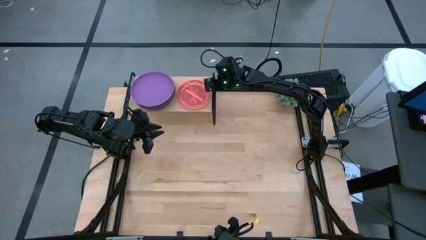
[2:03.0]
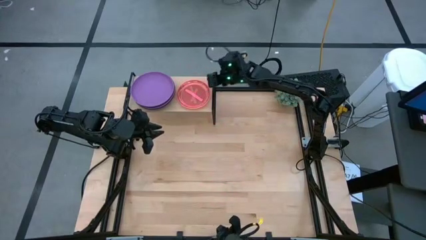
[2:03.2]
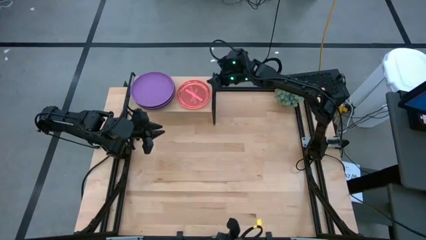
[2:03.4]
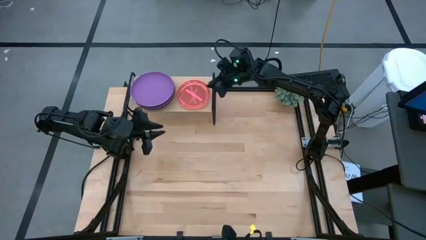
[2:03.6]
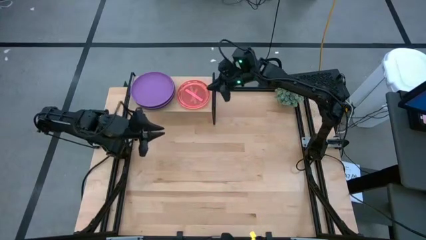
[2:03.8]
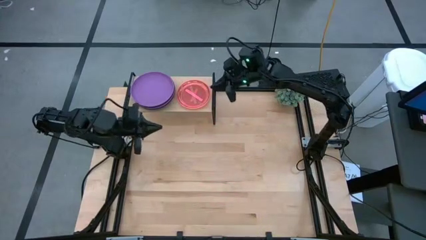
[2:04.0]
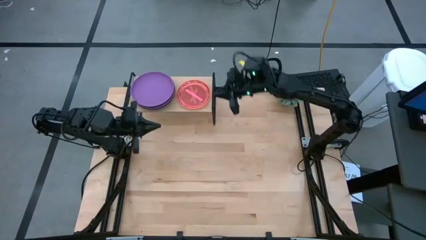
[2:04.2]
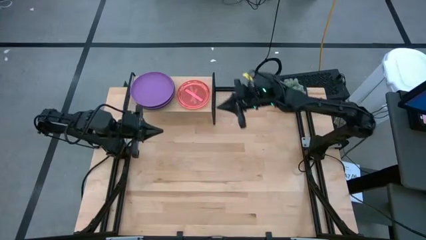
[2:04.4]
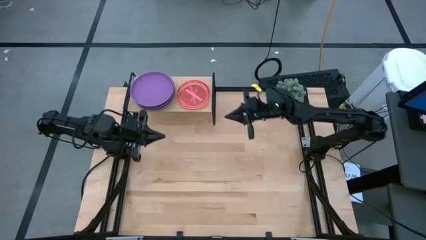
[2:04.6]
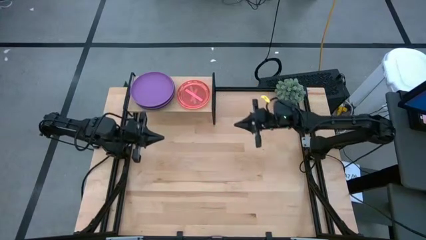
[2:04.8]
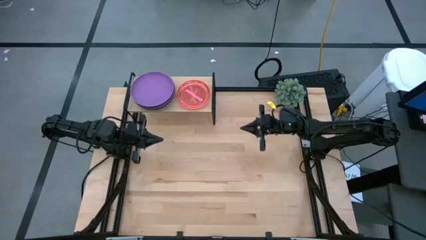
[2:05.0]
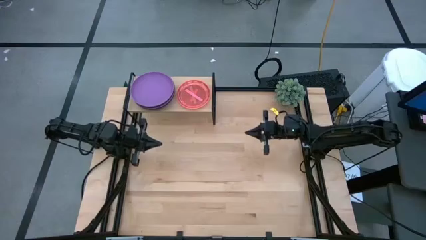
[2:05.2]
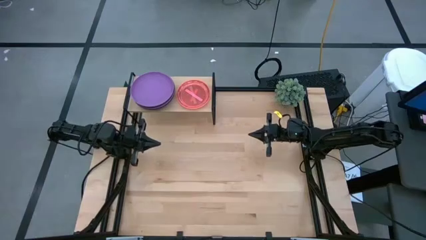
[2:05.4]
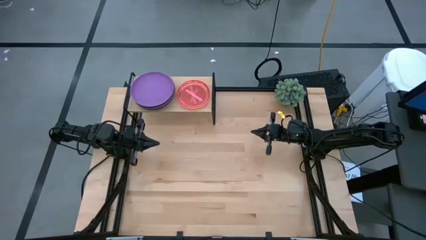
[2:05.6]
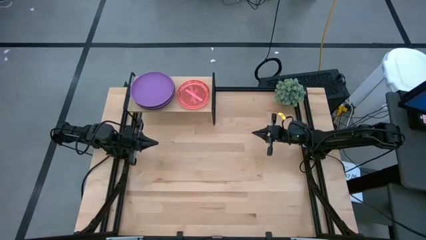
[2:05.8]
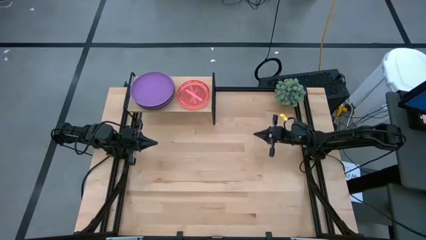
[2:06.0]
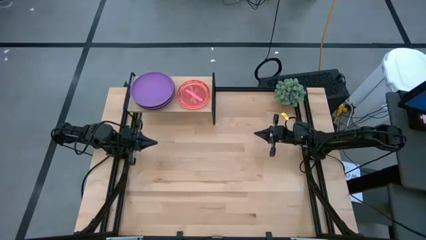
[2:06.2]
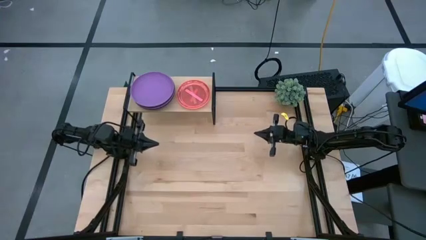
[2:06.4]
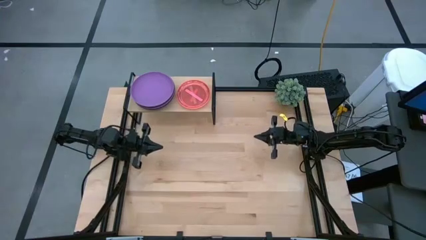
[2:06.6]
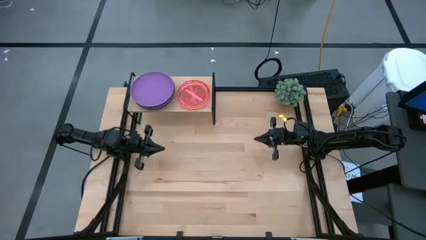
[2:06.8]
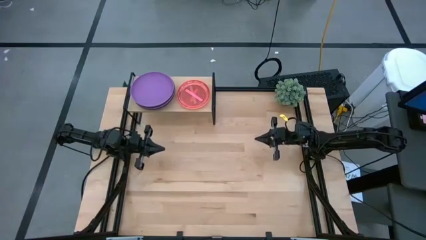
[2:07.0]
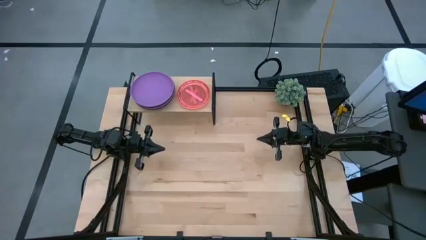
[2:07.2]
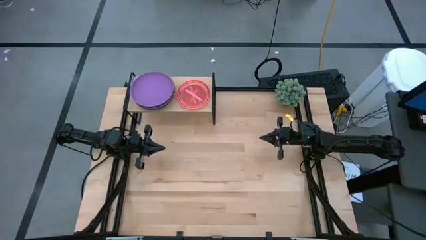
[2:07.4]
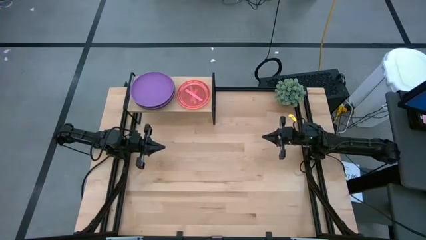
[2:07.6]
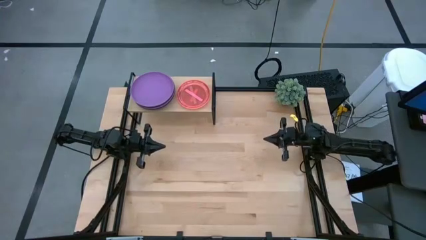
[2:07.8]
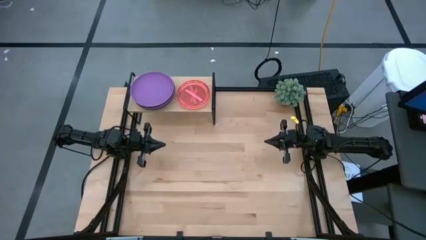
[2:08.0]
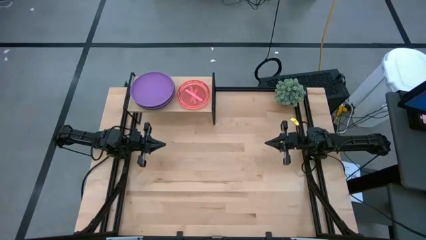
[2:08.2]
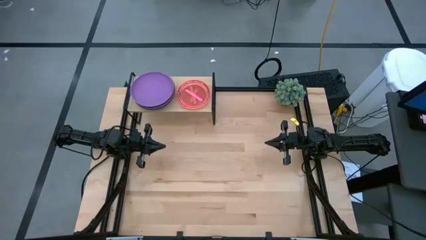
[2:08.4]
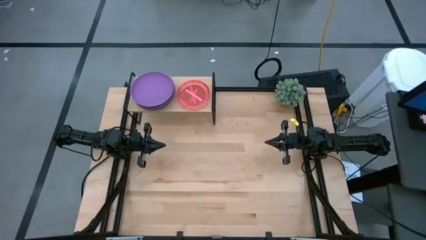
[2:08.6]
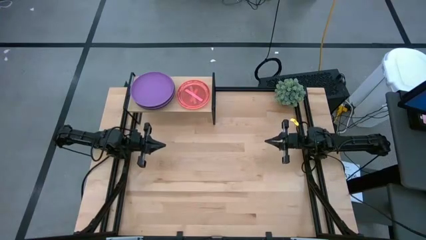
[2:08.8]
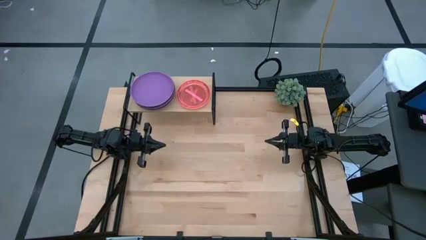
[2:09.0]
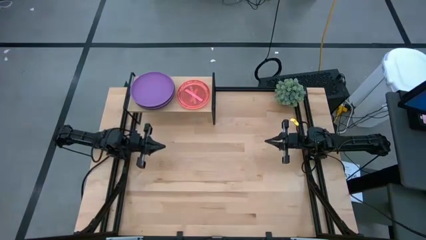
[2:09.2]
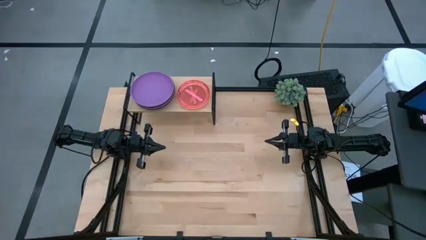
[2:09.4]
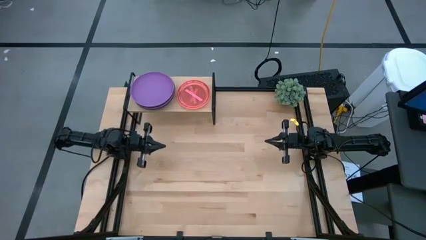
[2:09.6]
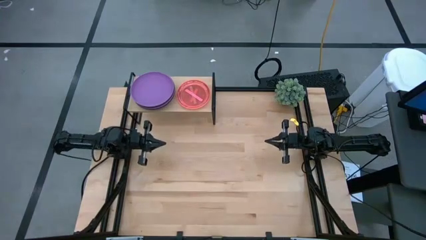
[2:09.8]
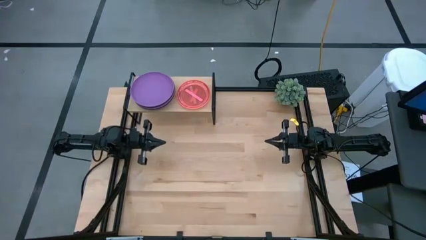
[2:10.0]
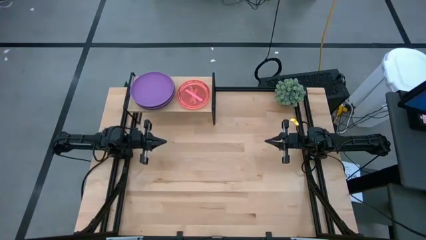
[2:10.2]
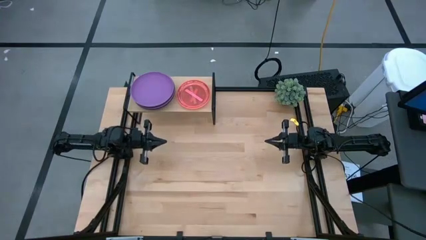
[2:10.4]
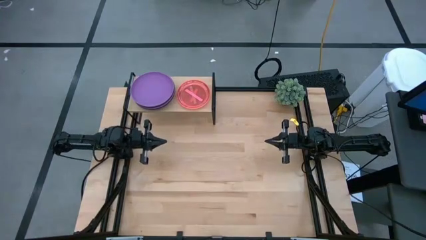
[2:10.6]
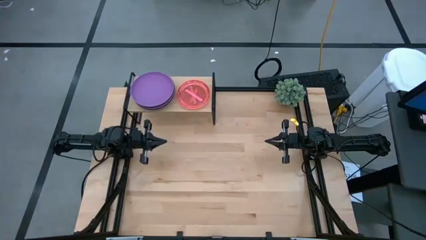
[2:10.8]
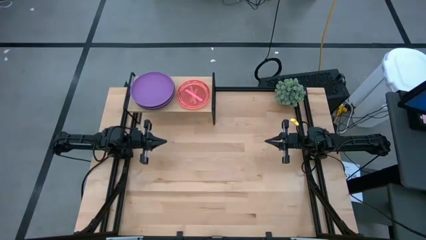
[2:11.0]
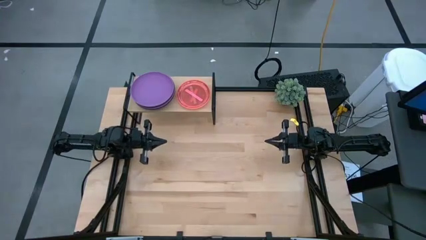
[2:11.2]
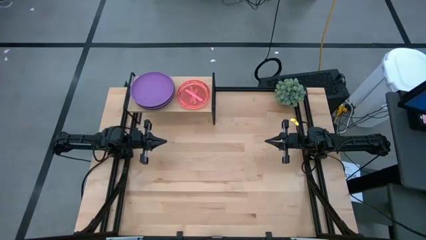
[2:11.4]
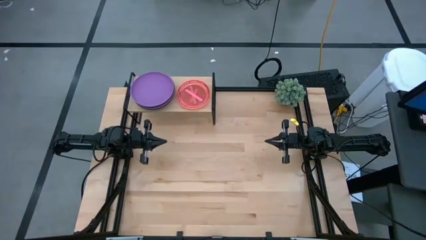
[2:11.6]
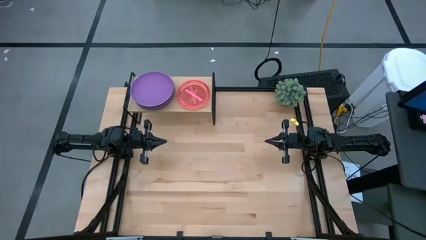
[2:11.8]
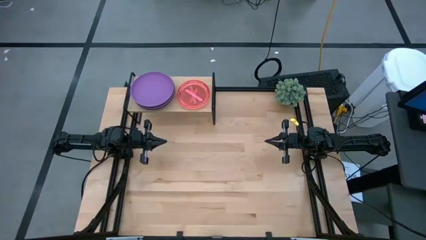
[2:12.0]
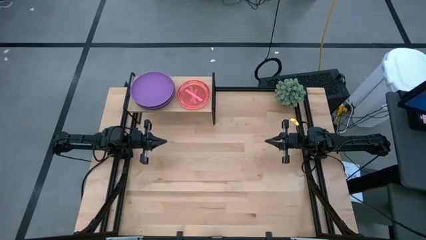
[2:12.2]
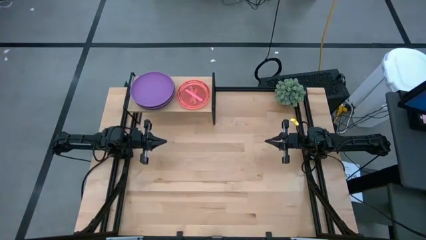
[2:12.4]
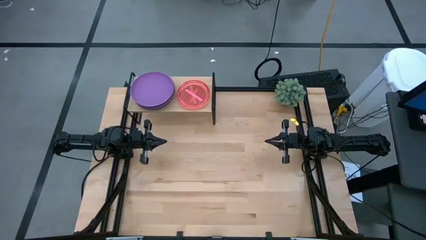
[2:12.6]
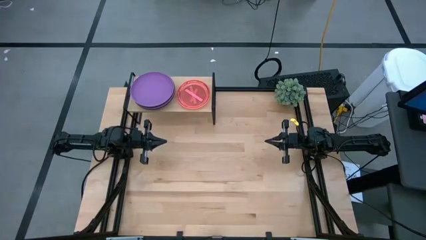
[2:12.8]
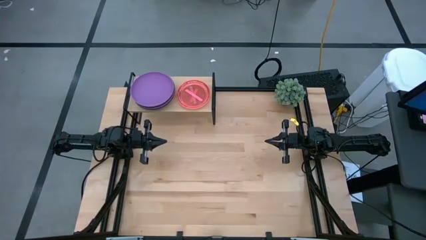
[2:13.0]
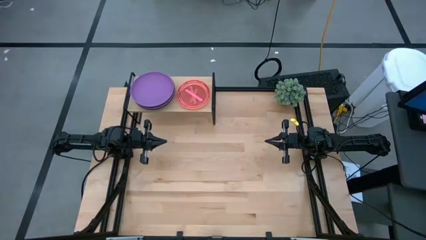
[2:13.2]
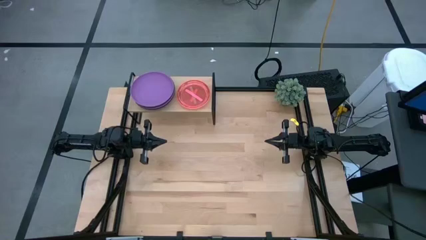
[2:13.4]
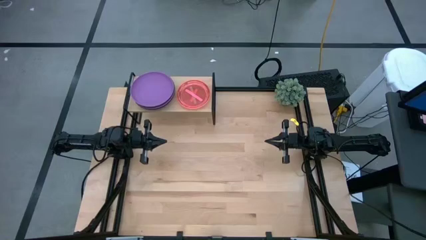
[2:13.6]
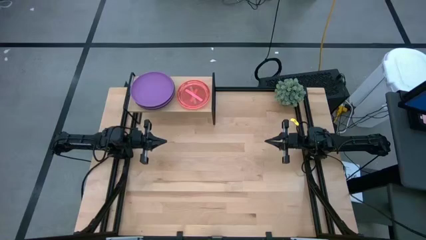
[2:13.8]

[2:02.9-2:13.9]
Task: Place and stack plates onto a shelf
Return to Home Position

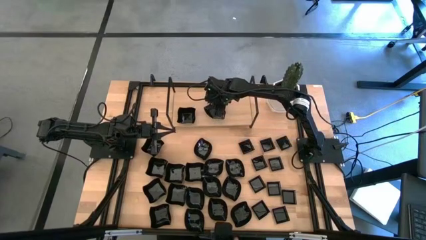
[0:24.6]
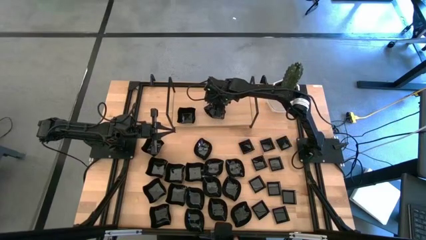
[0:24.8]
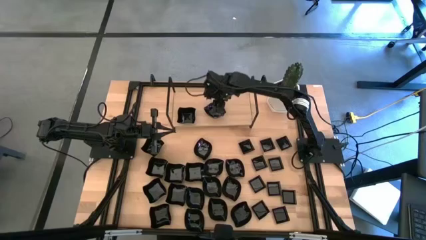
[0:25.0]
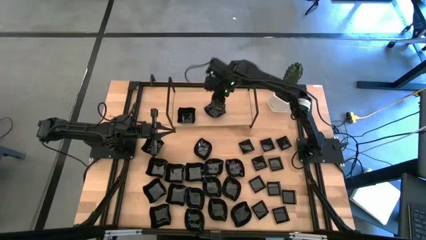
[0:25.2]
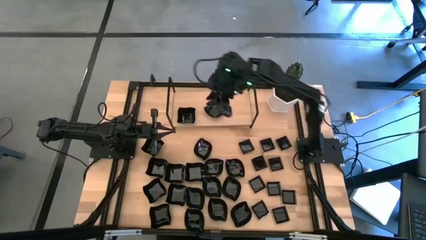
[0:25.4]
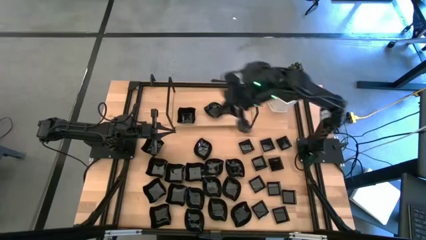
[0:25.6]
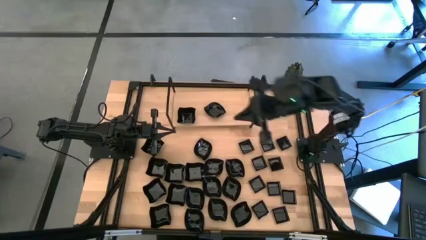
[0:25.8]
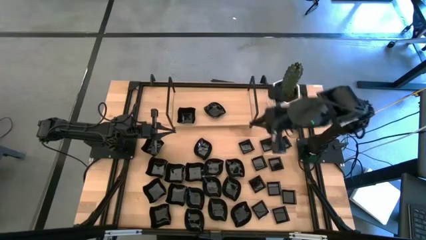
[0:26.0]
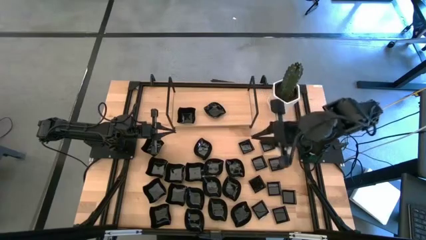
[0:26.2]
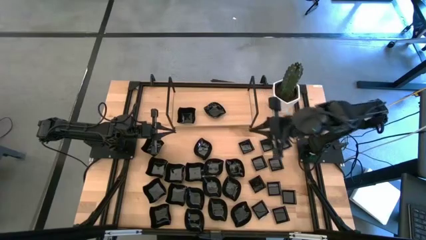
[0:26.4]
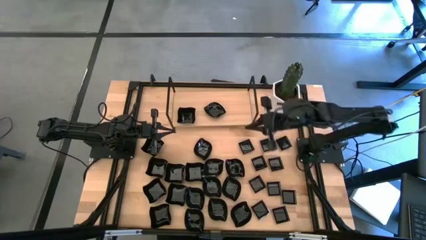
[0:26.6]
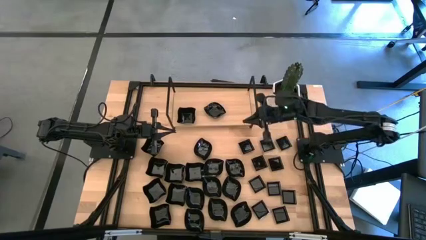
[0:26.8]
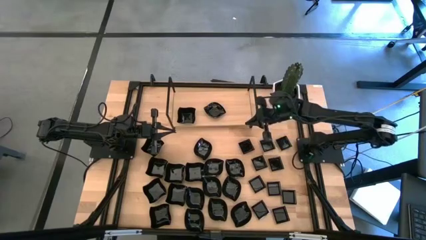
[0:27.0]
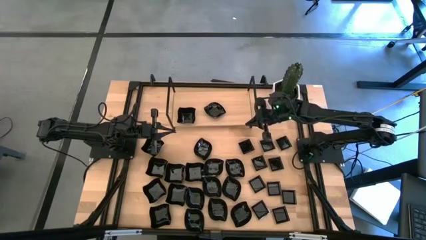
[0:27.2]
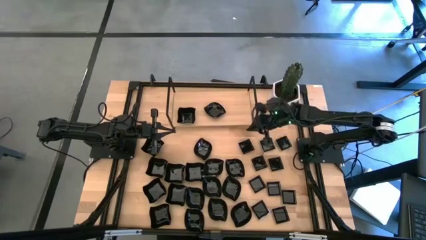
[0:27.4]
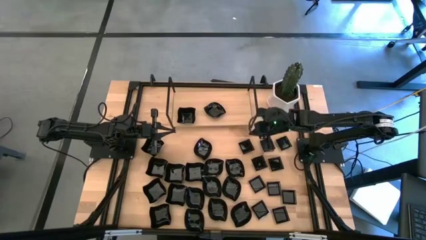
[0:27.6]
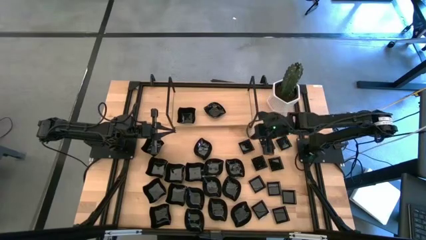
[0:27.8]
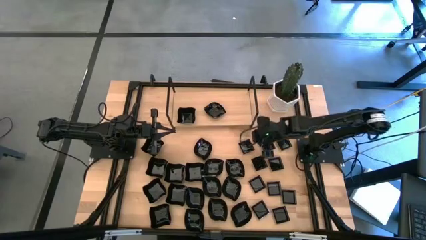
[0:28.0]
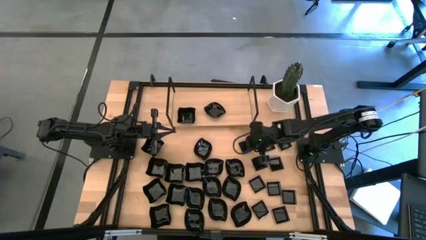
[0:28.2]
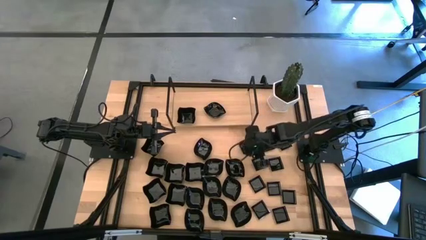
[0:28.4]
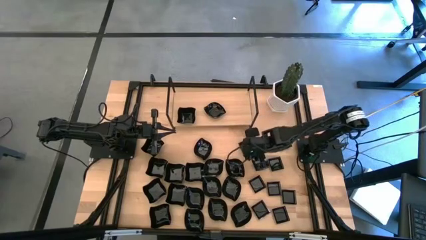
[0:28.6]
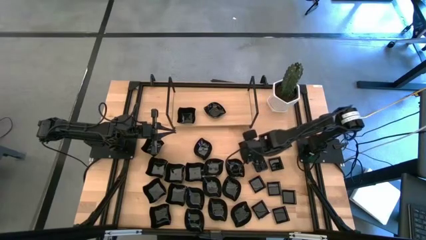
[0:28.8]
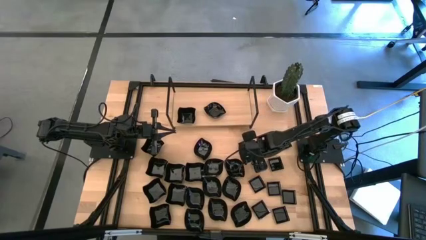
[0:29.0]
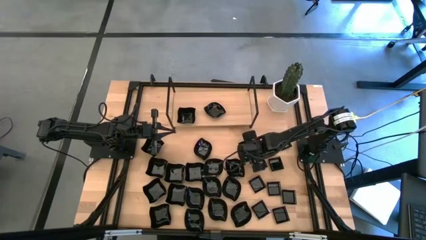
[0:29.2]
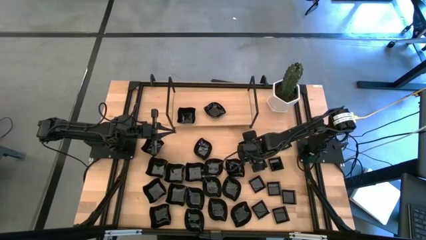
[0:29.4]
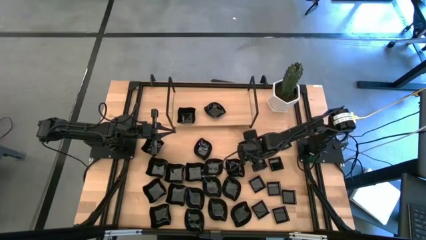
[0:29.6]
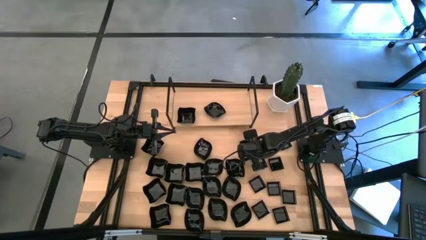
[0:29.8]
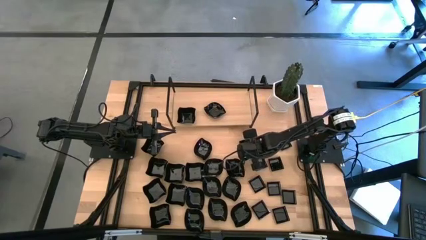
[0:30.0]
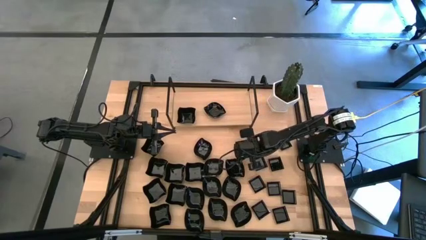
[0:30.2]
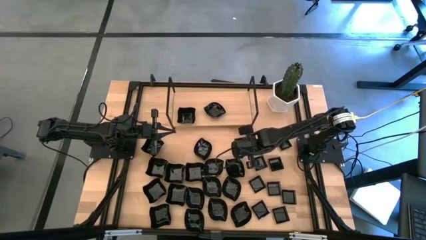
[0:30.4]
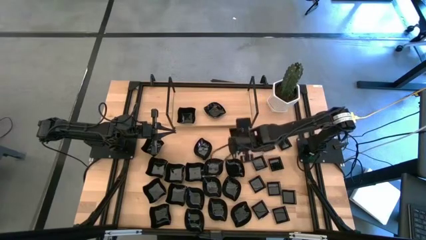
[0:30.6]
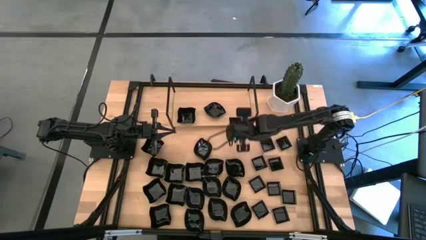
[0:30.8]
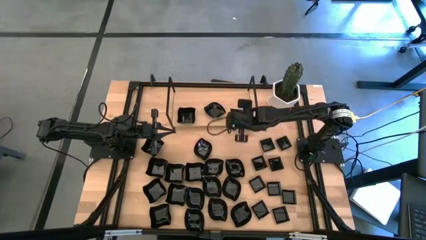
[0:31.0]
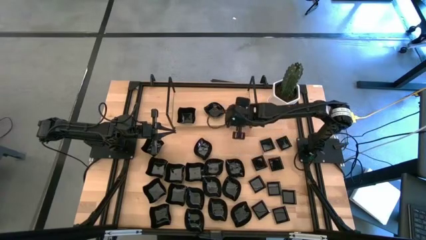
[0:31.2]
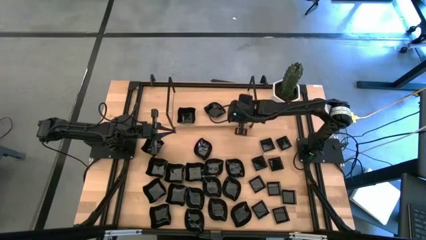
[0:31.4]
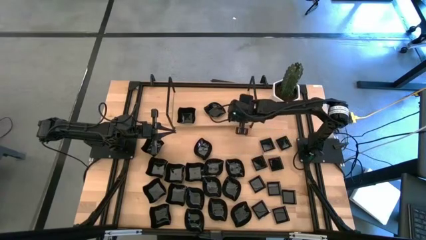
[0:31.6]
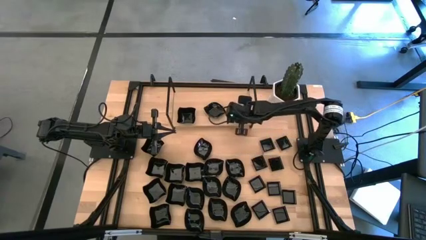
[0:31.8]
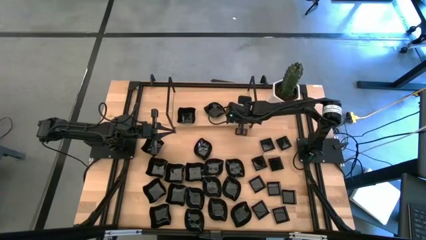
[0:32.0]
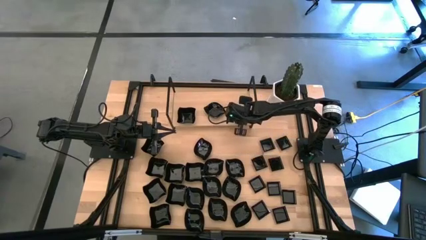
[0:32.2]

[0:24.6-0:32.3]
Task: Pick & Place Mini shaped plates
Put the black square plate on the shelf
